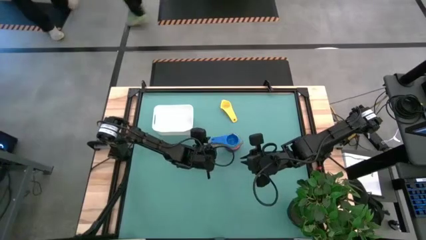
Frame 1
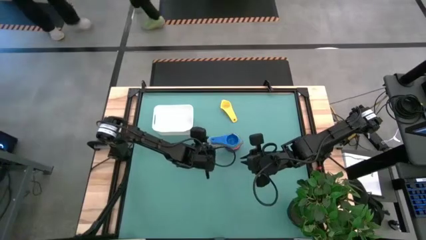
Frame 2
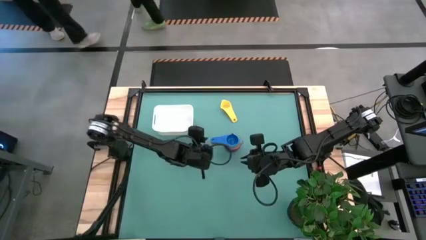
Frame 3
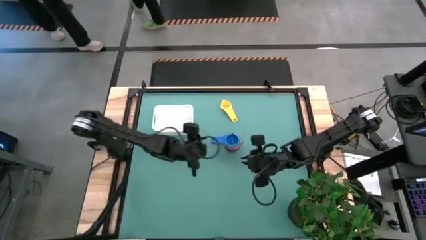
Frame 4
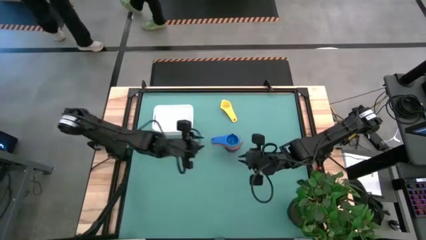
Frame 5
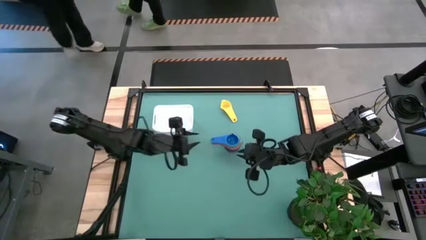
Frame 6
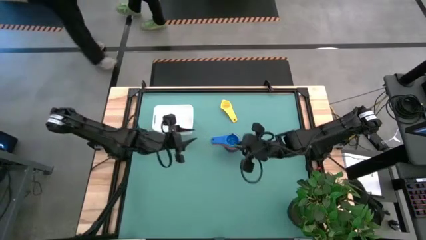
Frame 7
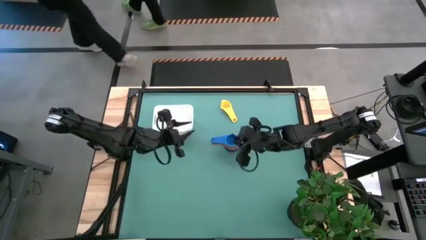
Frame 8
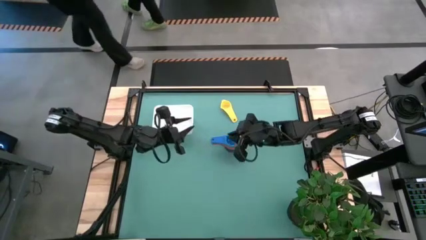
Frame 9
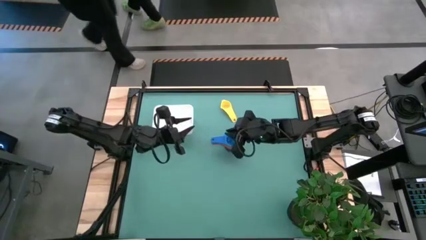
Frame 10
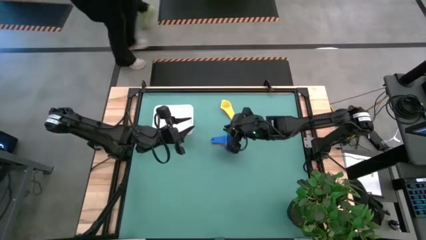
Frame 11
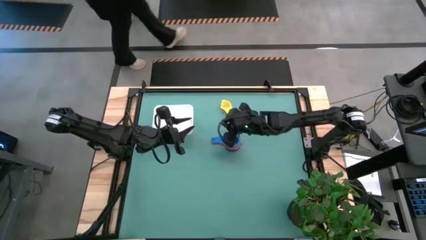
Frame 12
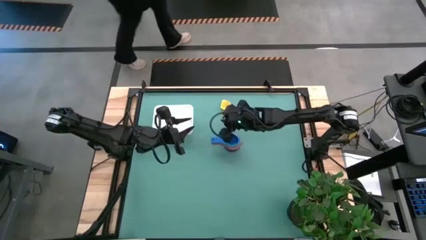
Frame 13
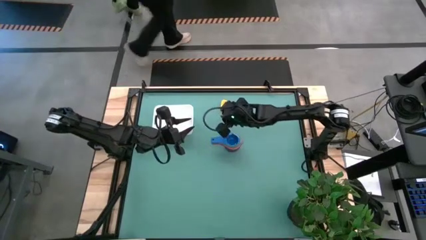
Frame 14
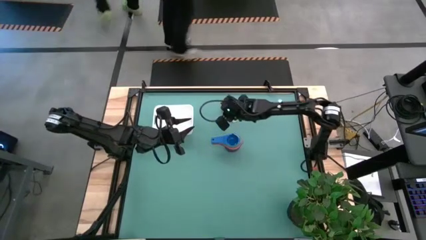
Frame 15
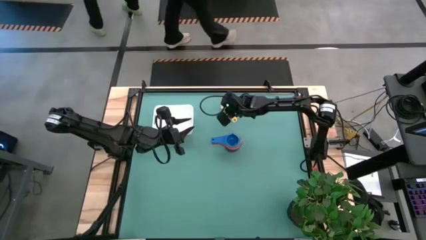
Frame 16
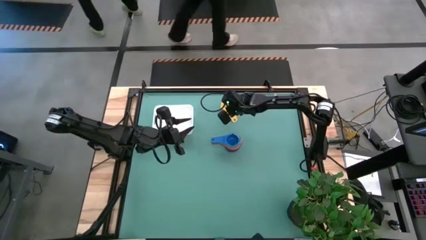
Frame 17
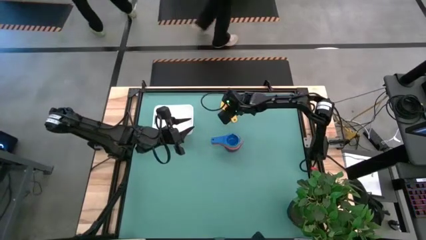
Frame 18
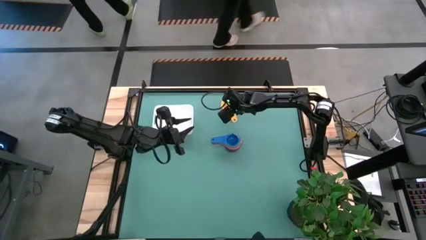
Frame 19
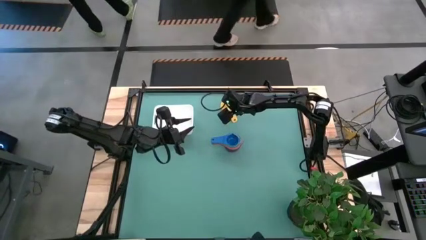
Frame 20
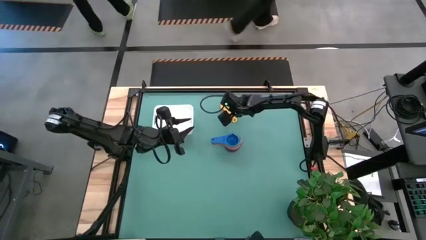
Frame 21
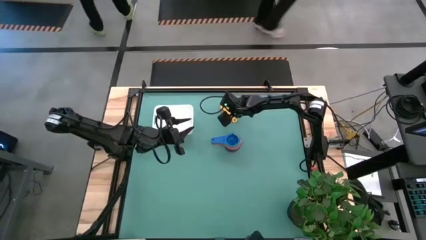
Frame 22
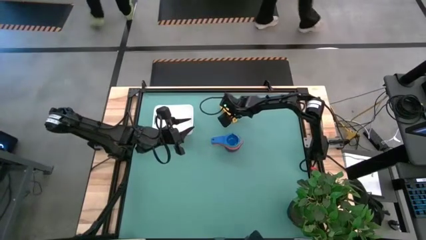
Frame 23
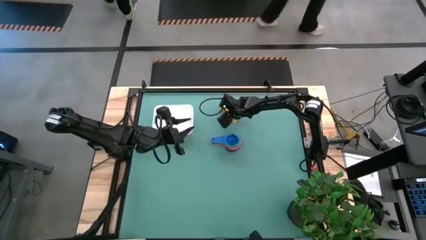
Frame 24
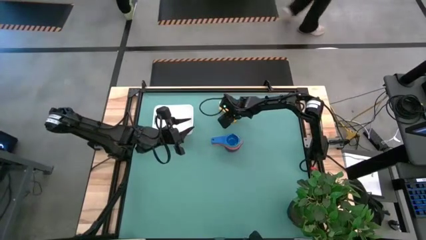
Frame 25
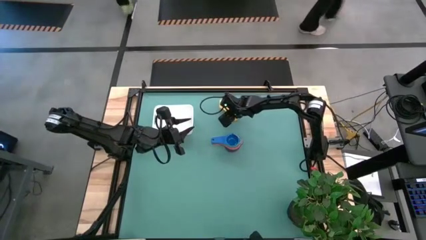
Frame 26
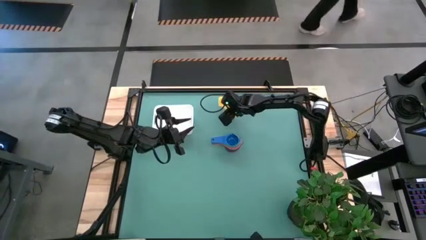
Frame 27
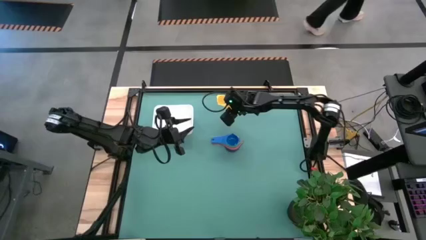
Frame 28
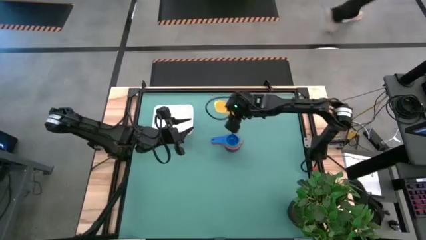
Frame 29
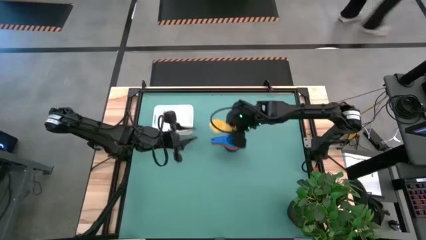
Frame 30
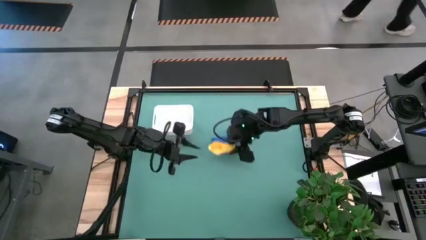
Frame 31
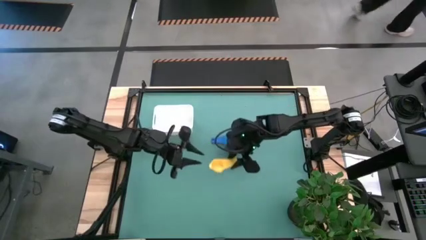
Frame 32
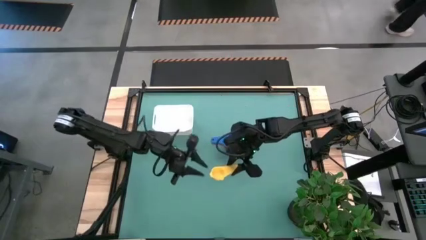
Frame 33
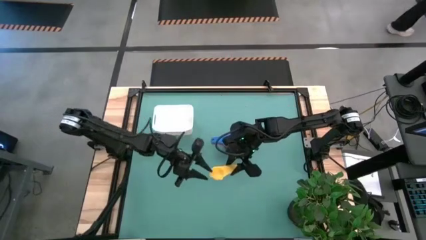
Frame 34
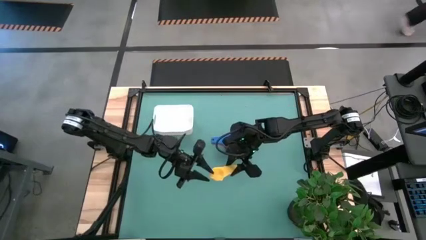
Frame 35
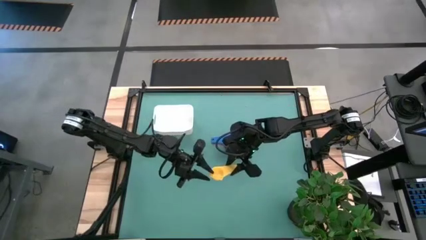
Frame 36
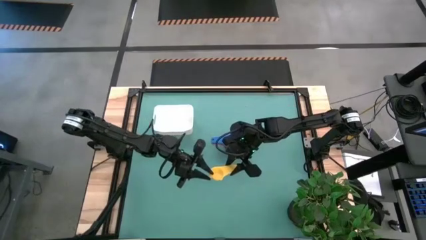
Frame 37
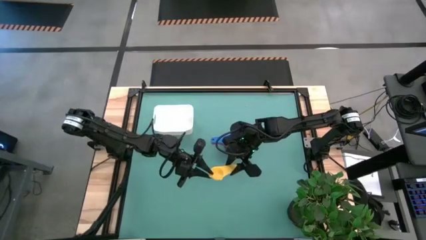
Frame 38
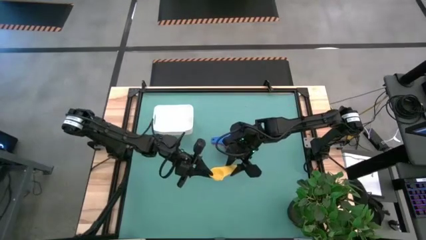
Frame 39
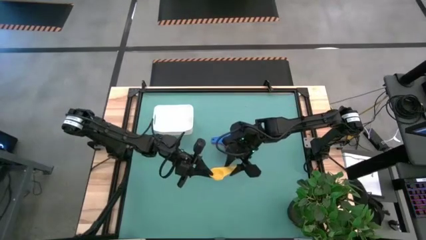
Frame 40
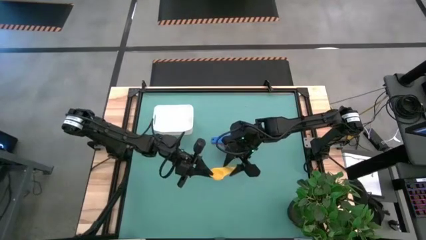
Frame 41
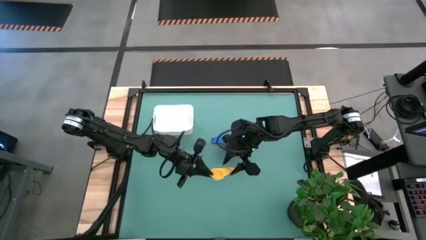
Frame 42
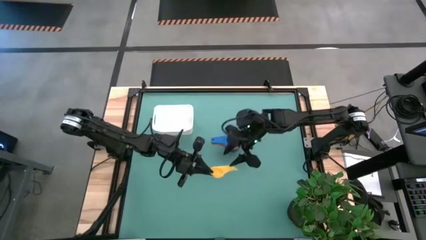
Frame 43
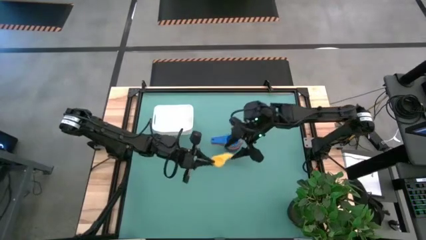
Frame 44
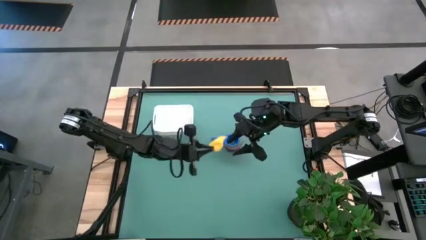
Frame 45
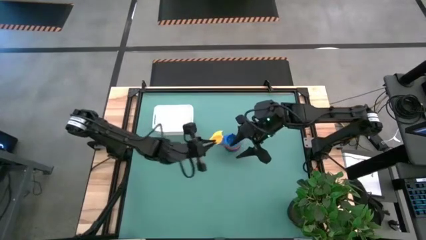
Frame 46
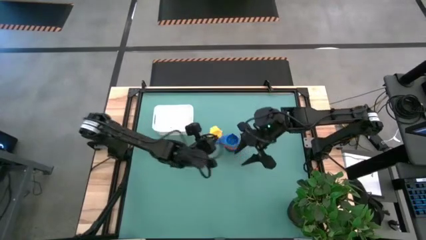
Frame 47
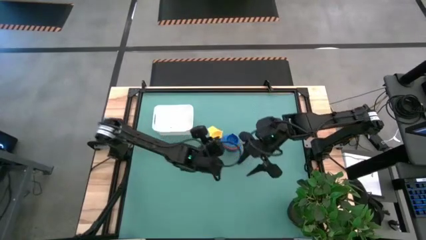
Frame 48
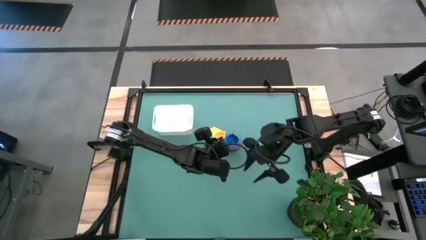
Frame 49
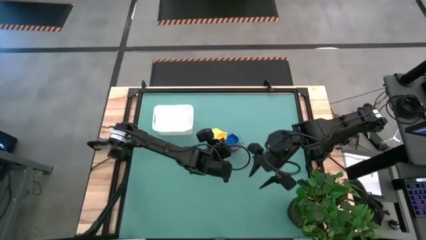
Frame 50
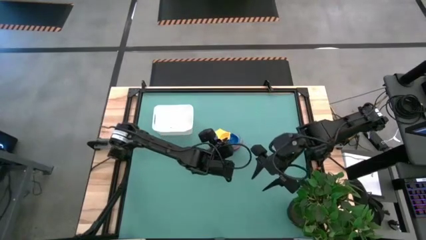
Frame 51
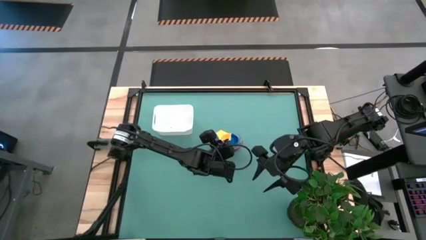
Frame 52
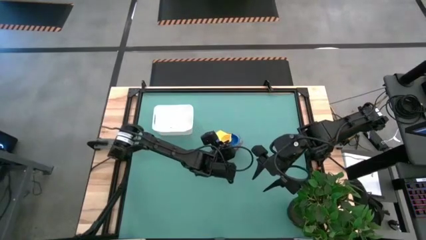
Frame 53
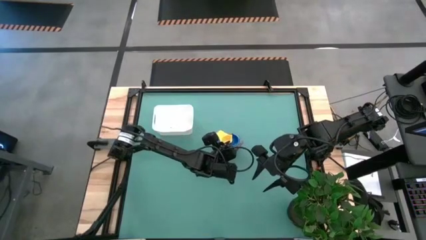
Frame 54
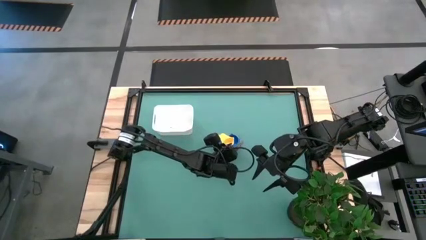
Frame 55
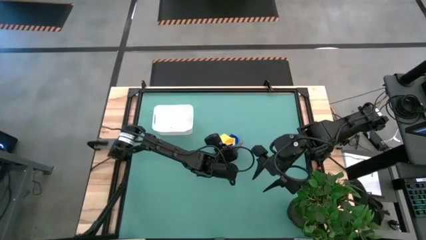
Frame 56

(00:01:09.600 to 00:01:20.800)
Task: Nest measuring cups in basket
Stack the yellow measuring cup on top of the blue measuring cup

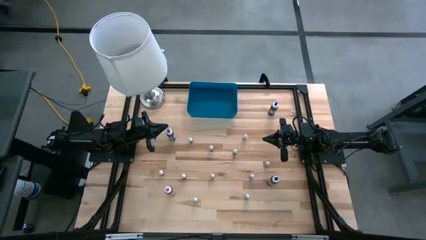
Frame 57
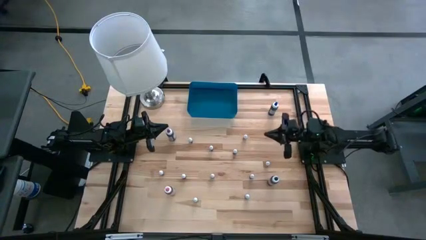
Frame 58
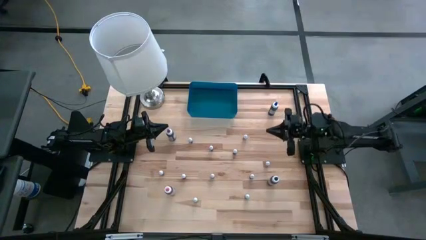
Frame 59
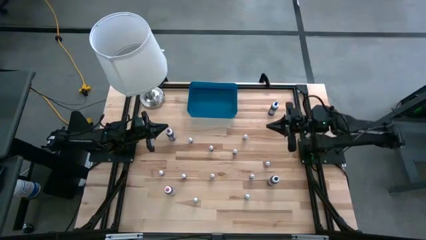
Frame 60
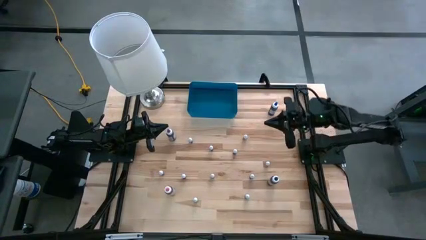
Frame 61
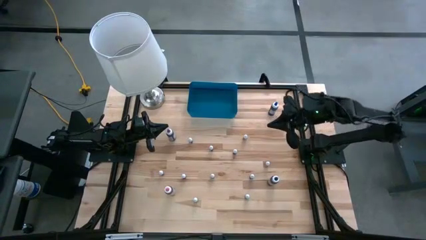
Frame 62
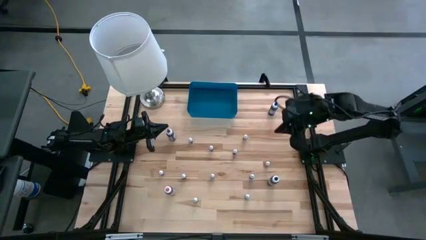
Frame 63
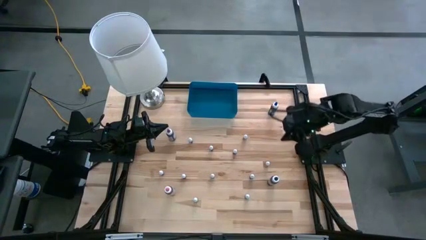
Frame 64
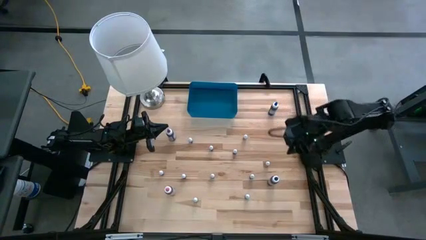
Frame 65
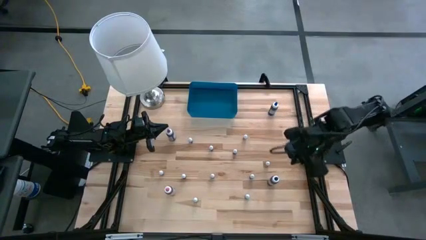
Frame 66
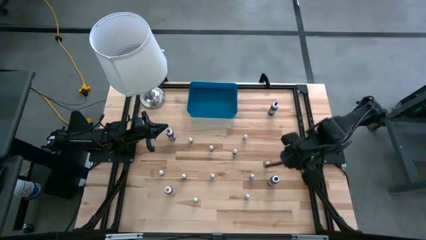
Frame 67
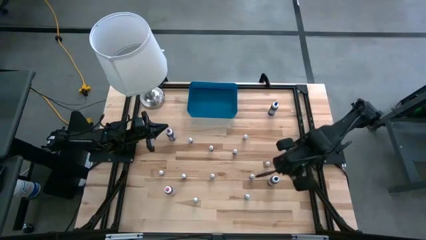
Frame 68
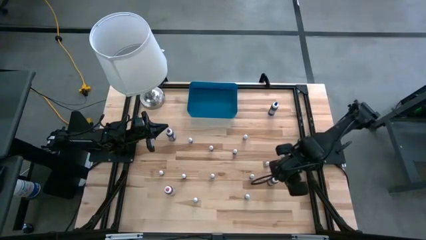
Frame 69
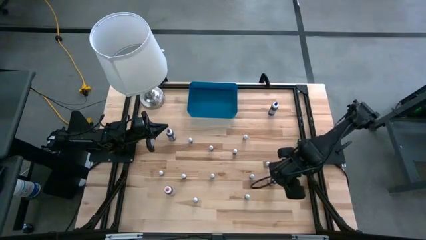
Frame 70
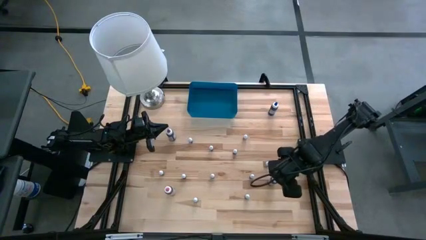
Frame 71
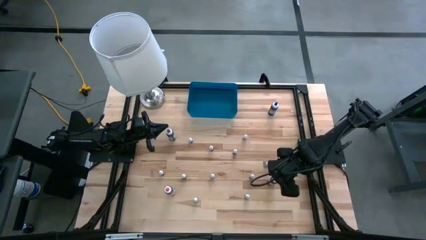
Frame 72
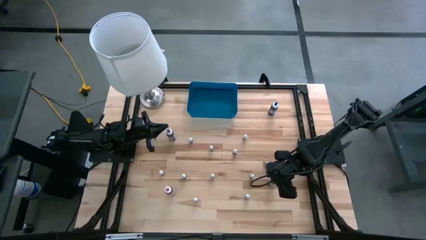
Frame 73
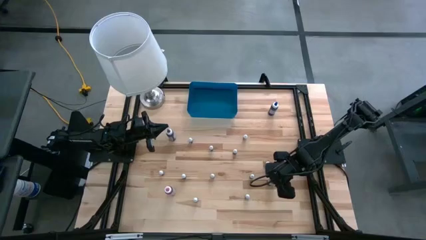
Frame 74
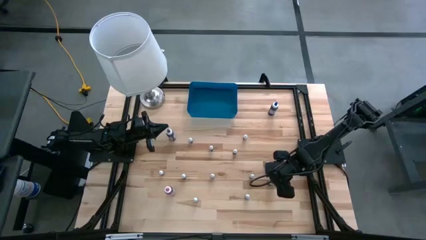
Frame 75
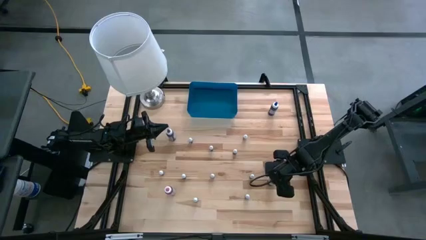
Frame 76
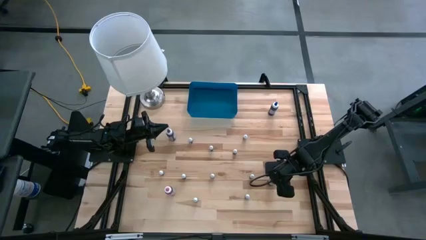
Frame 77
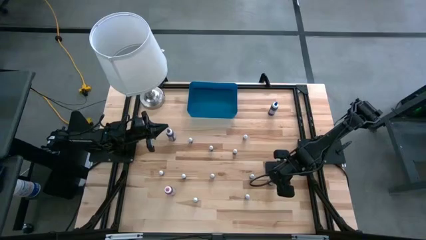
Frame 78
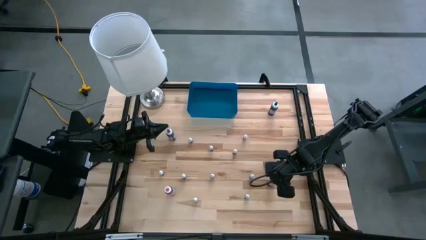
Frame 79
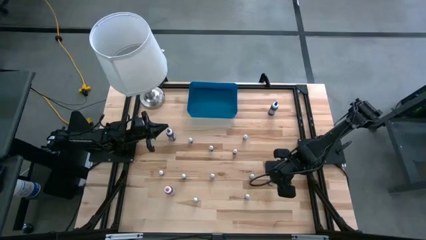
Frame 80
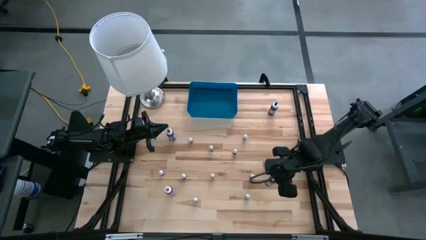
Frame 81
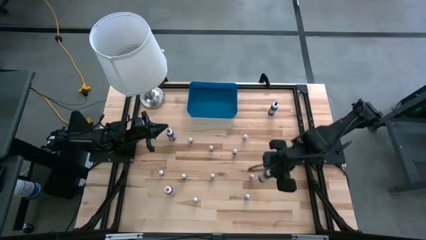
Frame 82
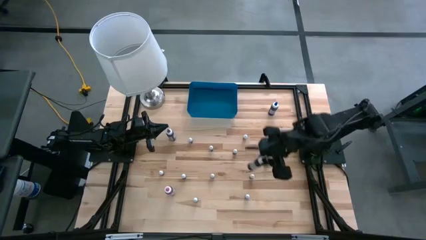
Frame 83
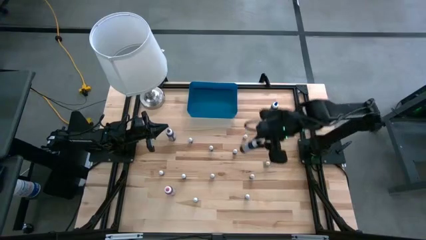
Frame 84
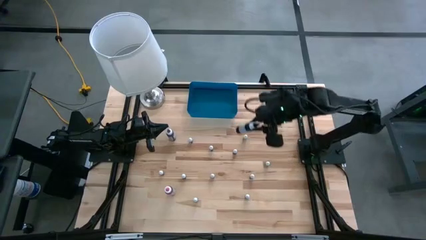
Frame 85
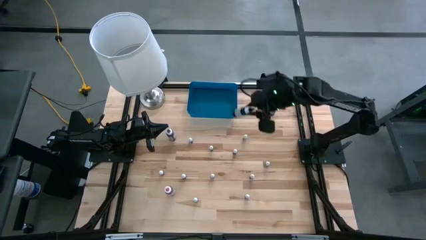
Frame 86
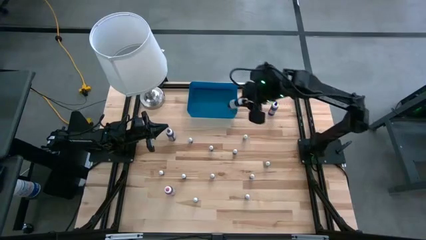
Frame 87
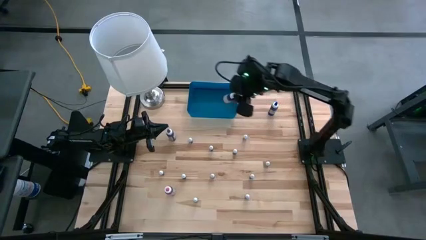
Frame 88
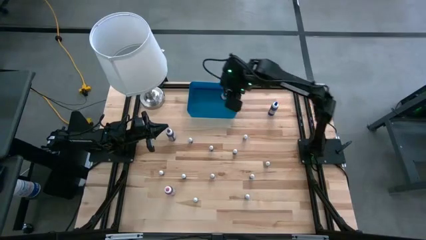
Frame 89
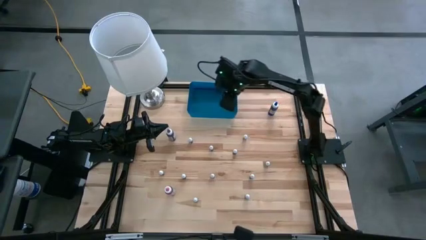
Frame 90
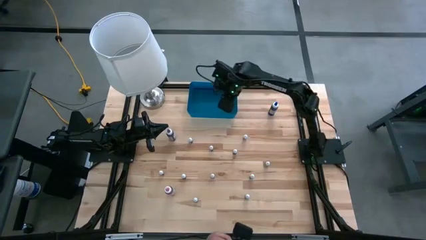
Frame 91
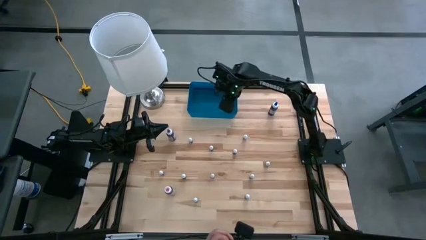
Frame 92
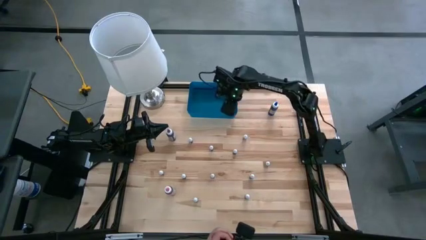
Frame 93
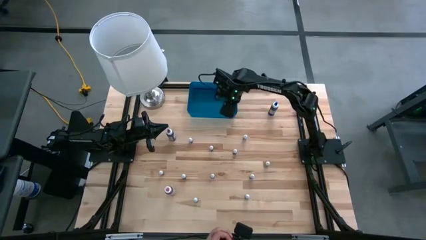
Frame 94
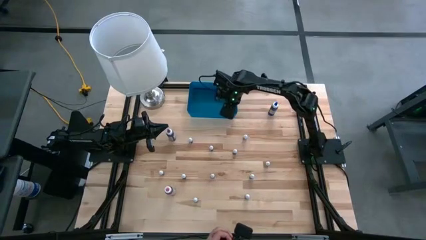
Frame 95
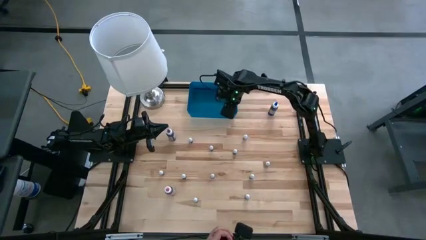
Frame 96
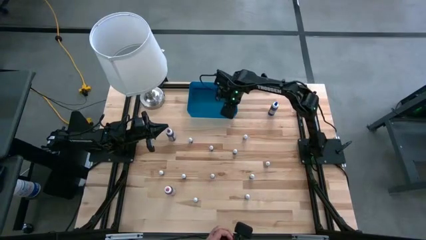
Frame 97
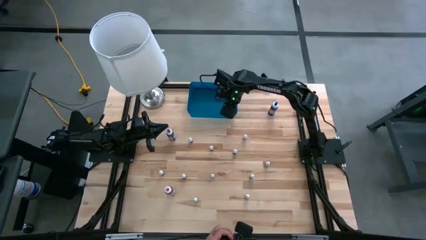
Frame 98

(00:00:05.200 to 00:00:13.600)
Task: Pick & Place food coloring
Put the large black food coloring bottle into the blue bin
